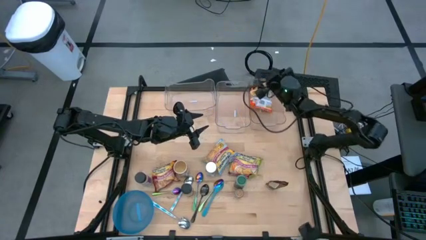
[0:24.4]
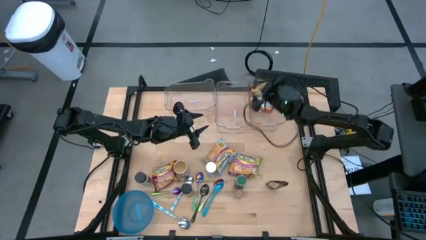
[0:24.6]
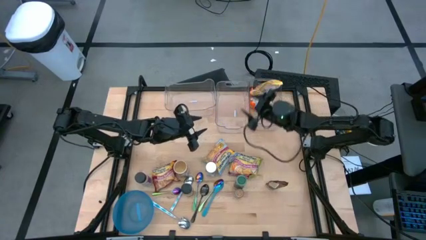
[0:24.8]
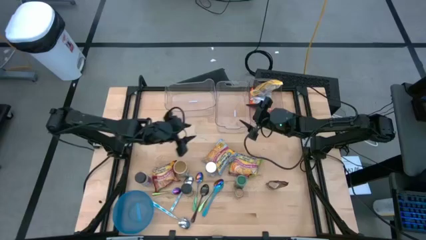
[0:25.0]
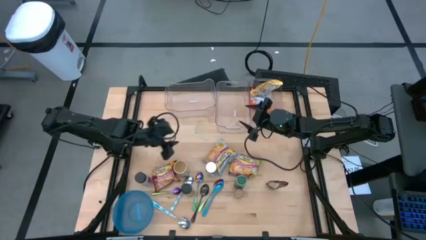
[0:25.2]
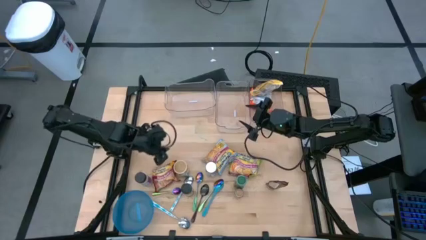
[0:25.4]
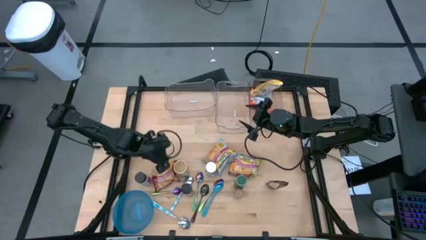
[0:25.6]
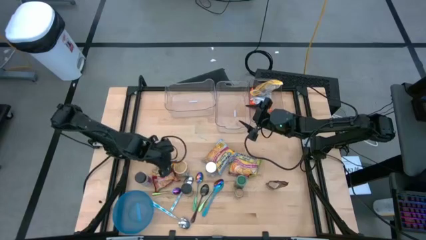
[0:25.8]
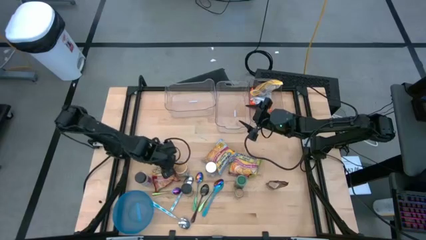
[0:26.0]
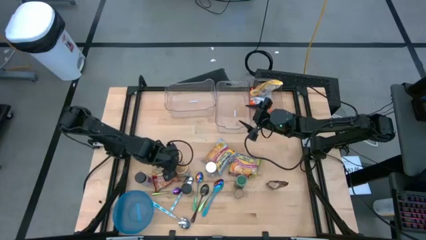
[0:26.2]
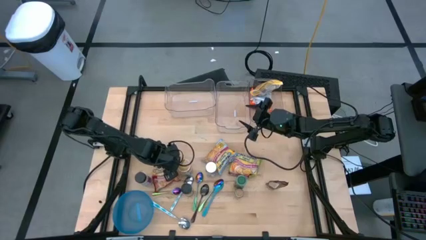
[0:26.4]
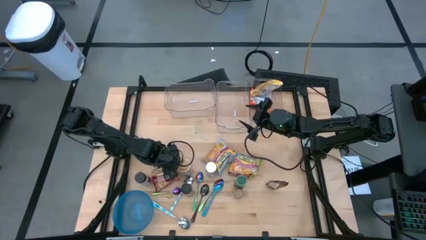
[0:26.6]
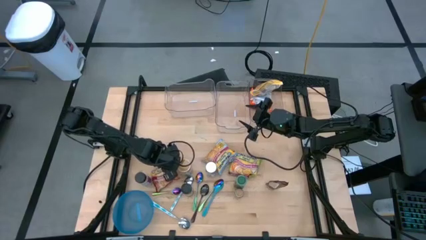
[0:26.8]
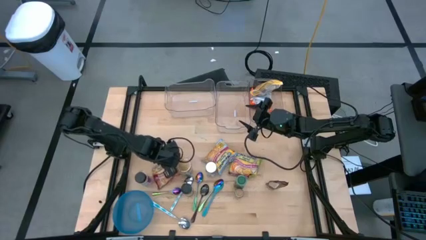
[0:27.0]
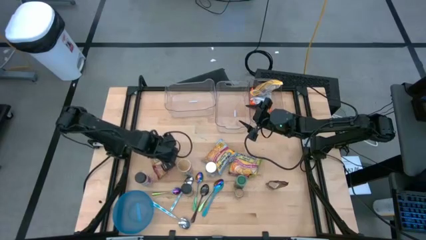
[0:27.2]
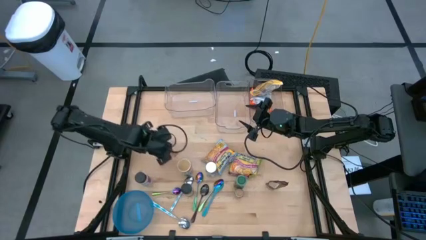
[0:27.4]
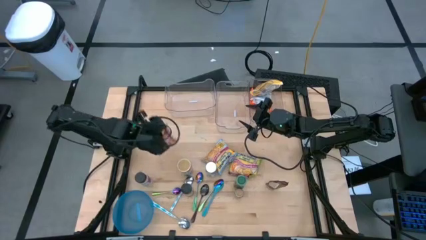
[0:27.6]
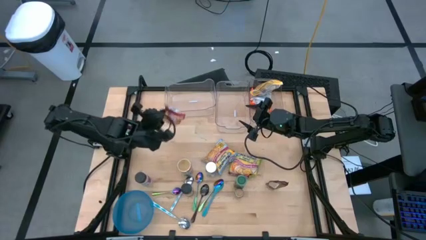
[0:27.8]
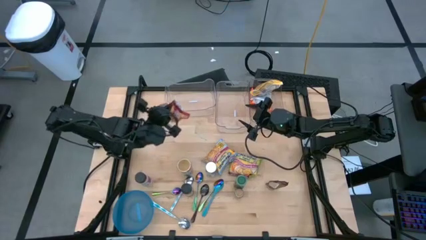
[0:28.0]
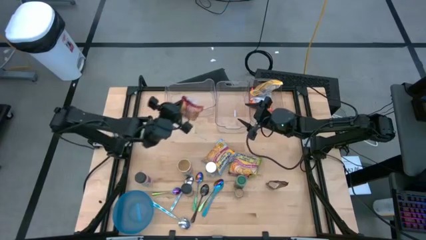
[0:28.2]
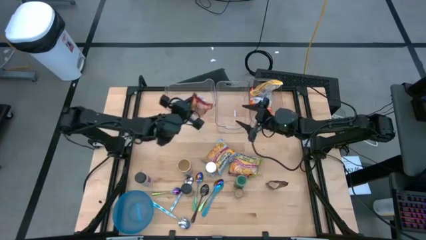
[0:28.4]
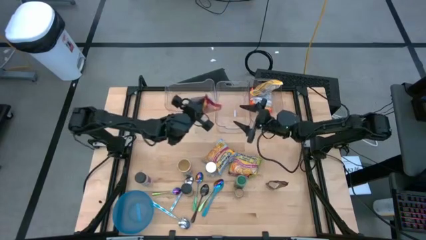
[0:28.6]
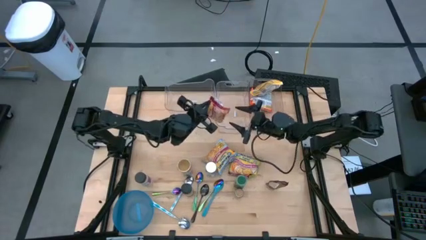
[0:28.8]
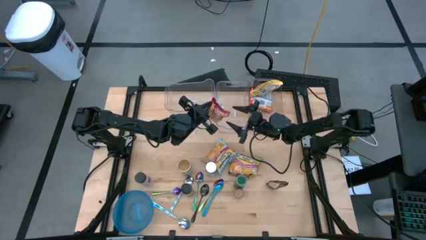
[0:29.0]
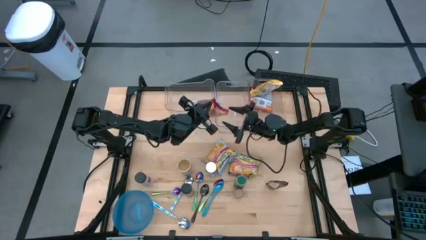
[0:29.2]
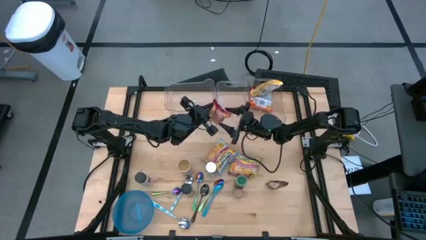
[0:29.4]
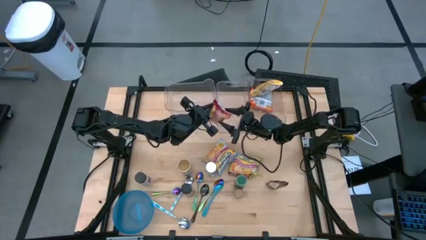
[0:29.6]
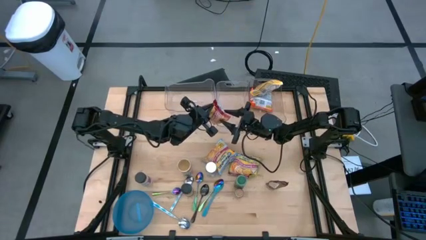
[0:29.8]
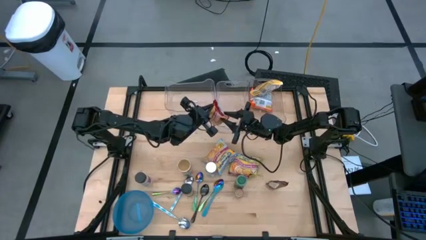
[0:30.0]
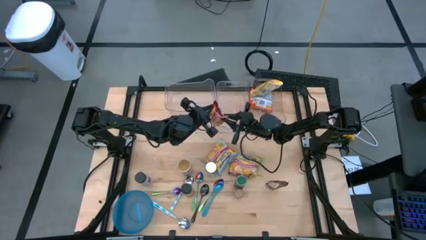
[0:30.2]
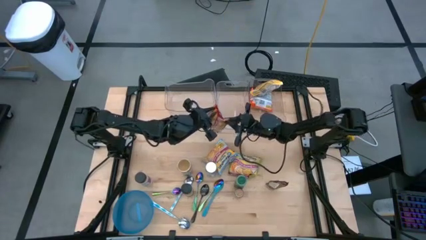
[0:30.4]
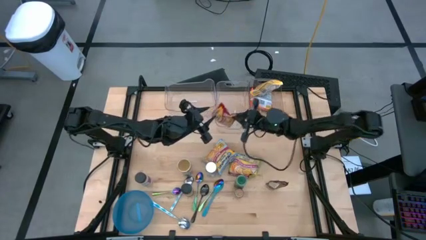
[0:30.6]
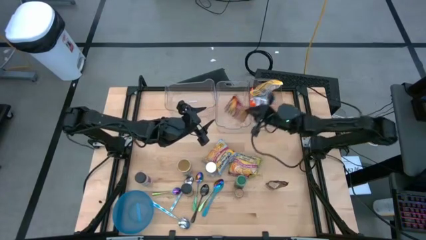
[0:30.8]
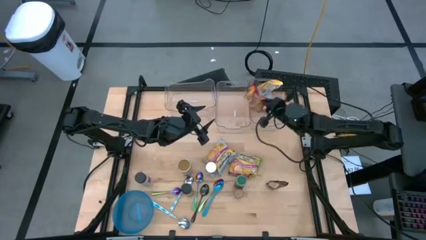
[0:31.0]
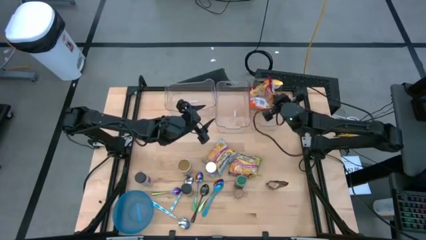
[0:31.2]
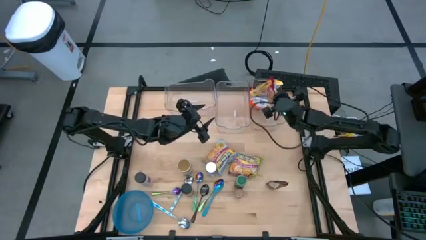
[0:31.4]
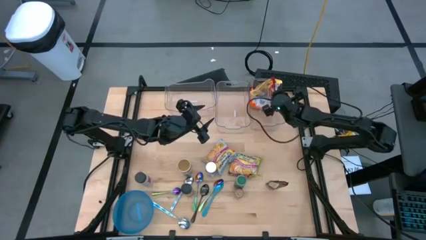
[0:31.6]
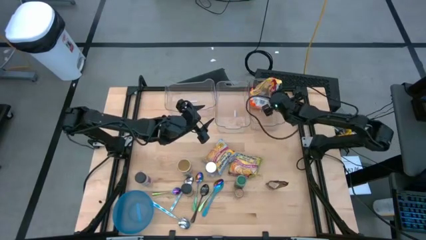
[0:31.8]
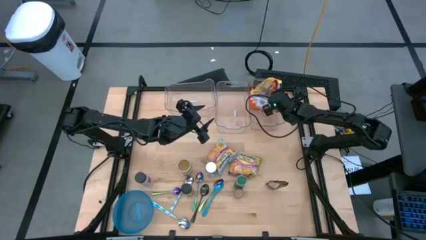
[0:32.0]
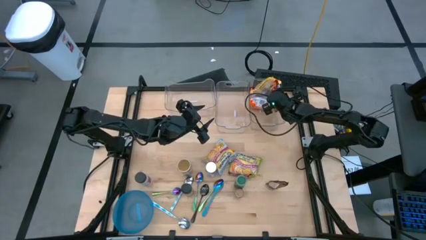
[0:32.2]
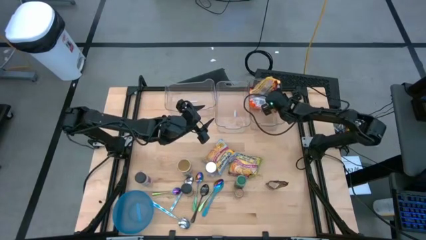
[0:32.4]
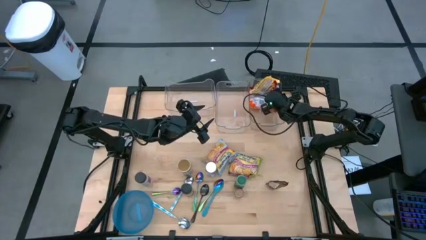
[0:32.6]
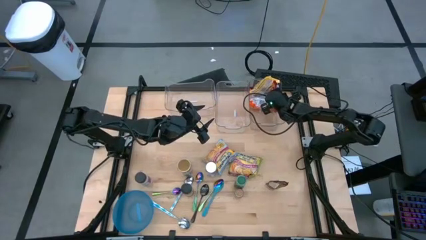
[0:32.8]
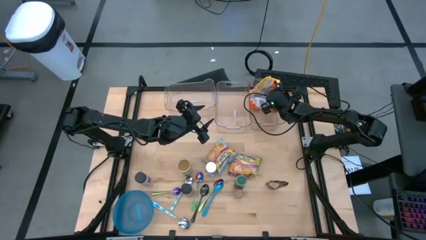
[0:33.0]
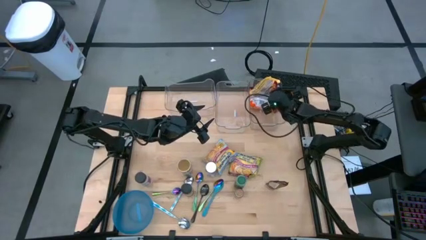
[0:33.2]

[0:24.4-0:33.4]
Task: Pick & Place Food Item
Put the red noodle pack into the right transparent bin

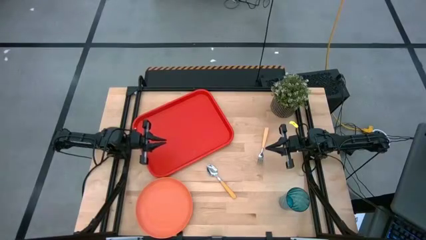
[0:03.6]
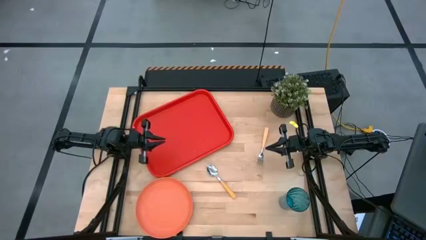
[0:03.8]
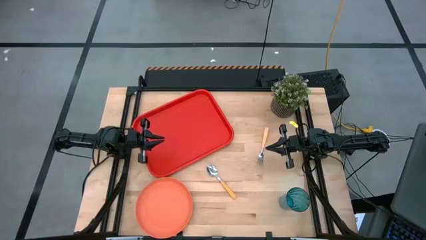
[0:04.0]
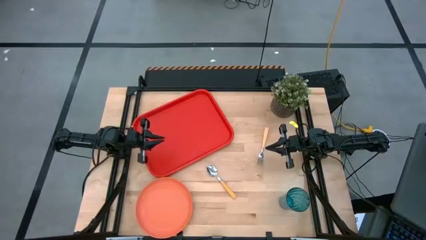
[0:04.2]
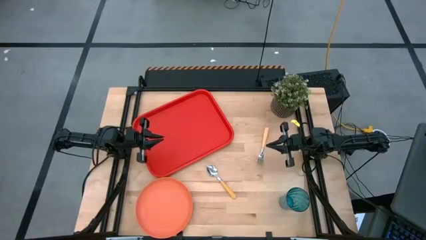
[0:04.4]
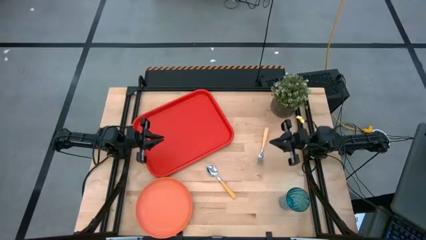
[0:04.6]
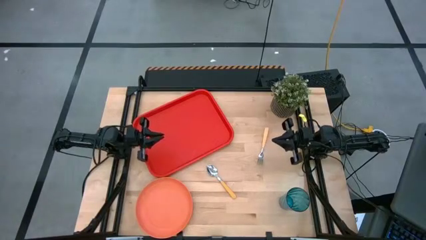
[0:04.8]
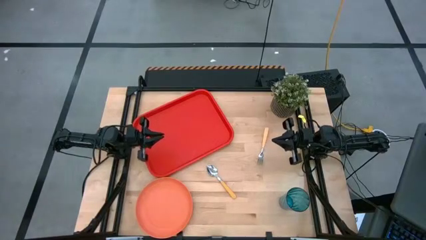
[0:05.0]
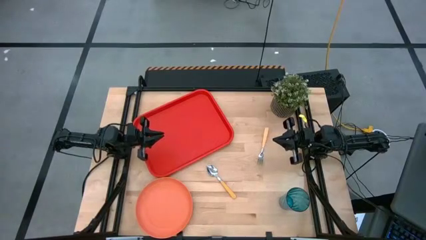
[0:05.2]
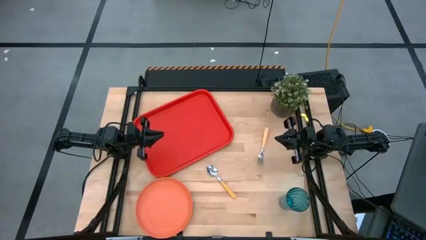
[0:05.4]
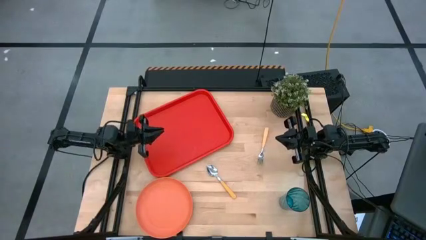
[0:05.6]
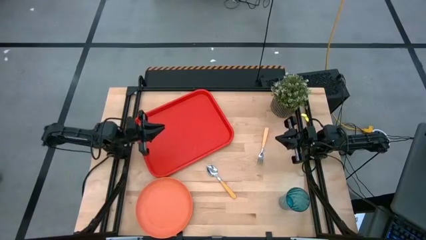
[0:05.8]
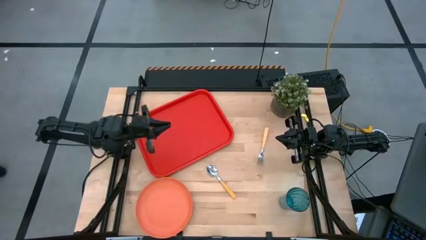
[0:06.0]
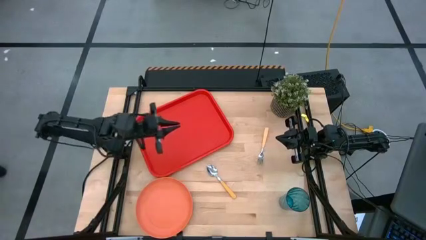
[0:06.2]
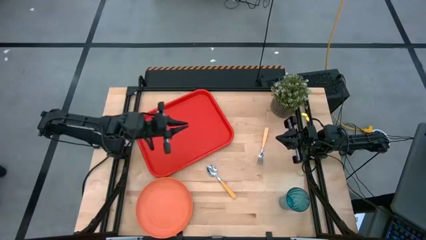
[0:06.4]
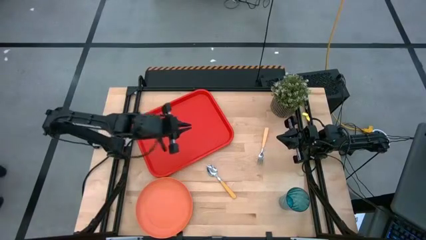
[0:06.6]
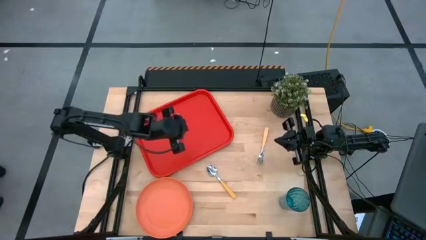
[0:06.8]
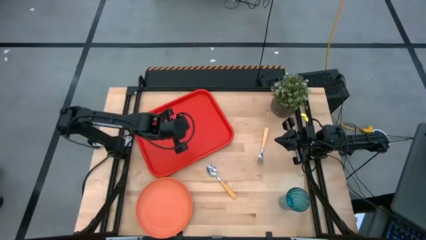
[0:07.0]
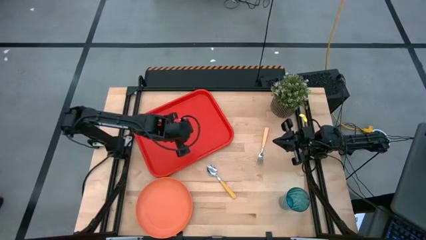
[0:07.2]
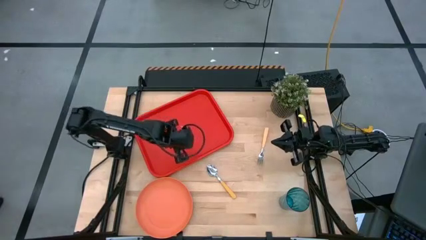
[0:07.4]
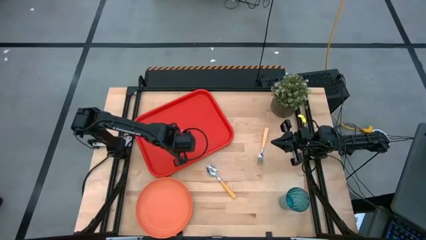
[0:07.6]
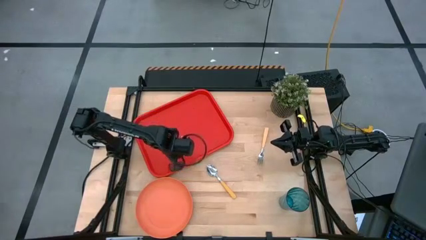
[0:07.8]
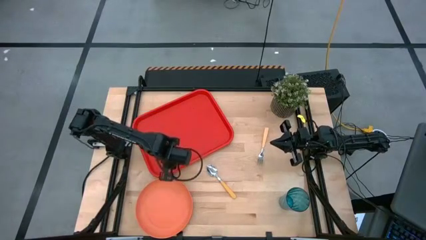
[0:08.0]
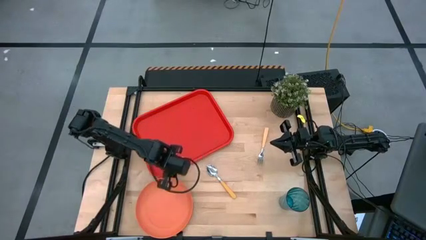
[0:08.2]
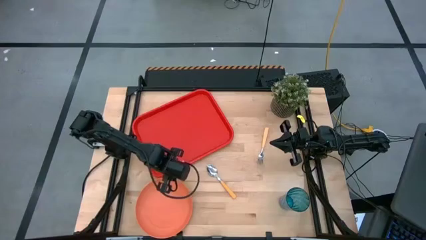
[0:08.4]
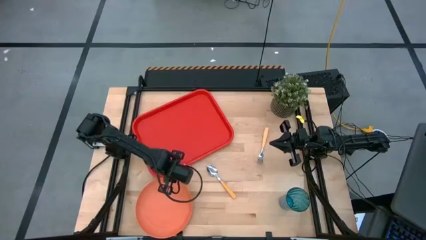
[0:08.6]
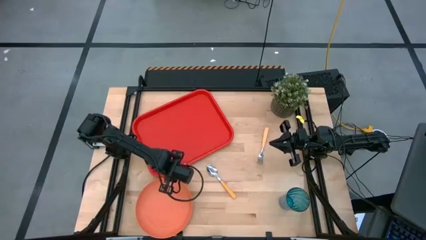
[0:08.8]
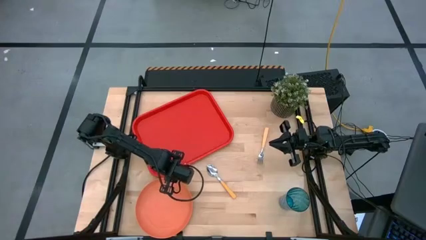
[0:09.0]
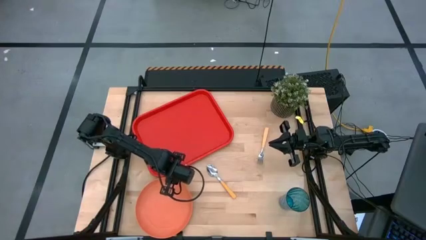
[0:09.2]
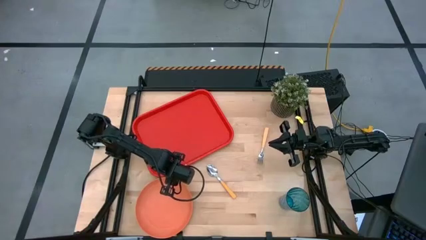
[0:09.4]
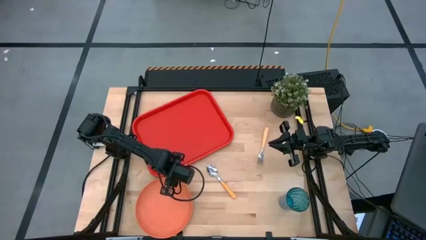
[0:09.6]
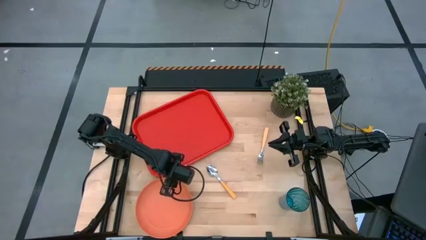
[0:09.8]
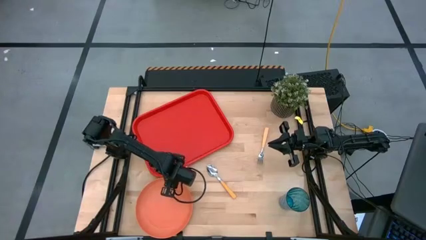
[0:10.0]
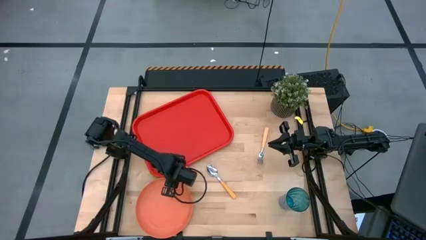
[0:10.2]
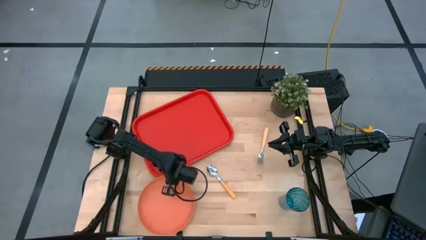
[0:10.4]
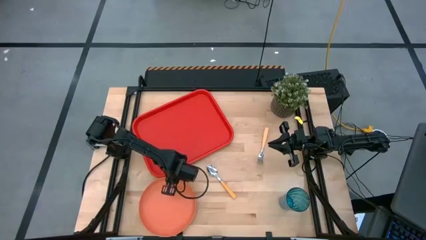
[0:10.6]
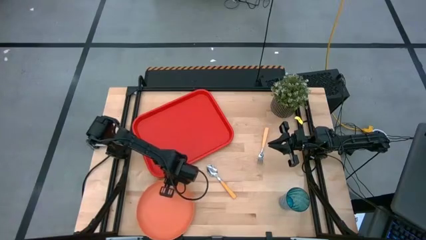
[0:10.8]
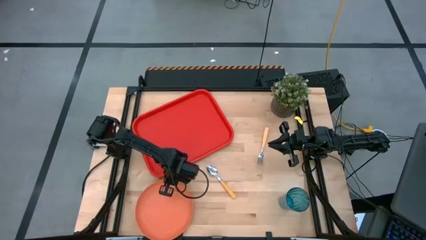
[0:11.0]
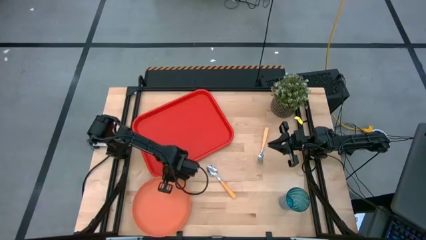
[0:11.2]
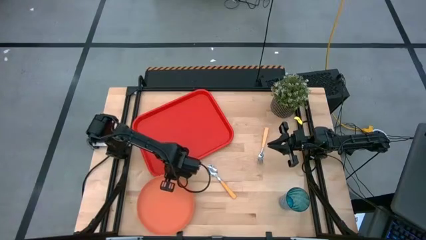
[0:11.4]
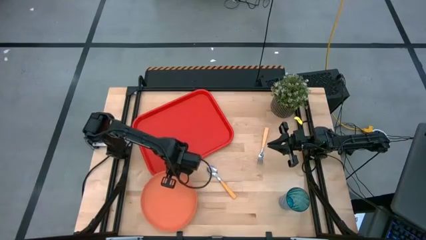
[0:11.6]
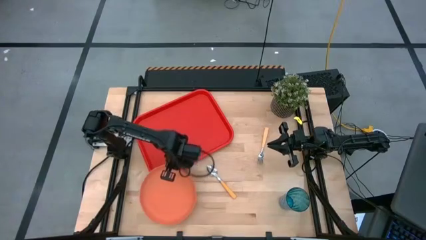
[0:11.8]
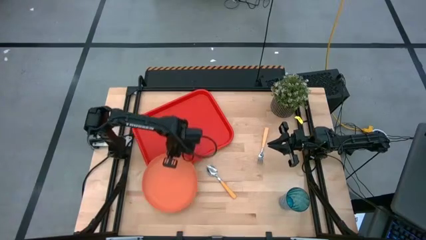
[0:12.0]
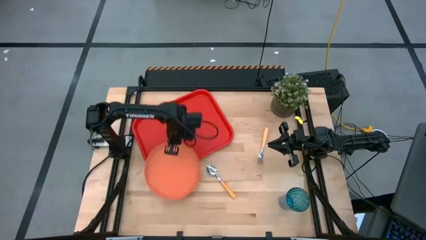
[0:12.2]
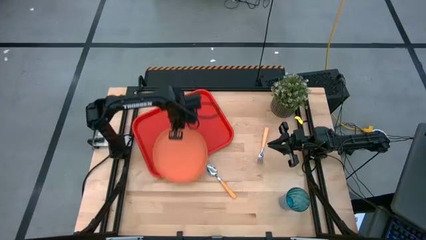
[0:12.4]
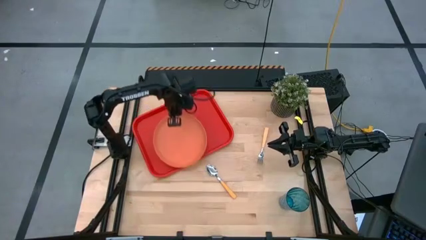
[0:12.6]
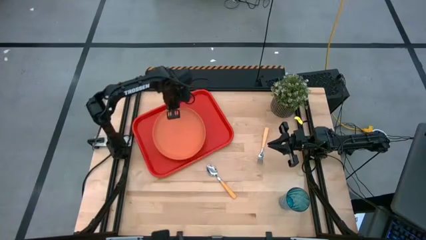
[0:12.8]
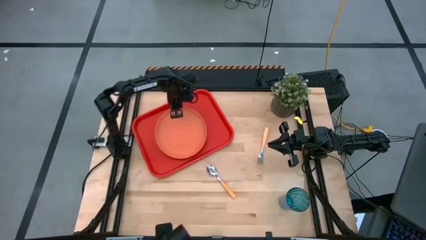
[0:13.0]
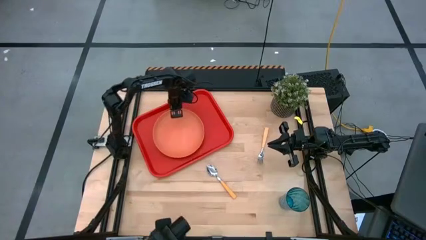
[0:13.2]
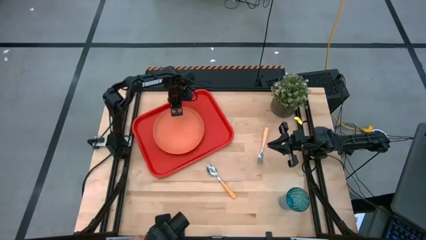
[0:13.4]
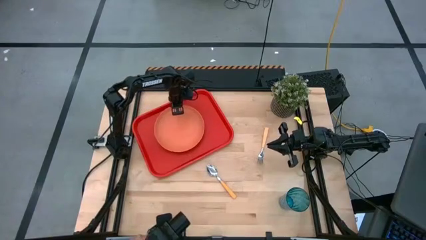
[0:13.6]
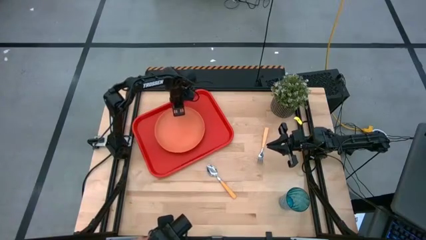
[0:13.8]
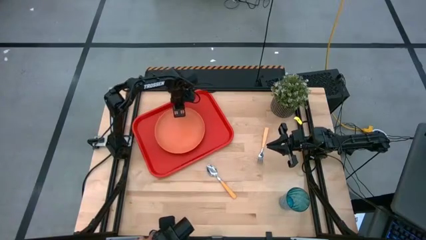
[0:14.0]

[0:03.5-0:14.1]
Task: Pick and place plate/cup/fork/spoon on tray
Put the light orange plate on the orange serving tray
